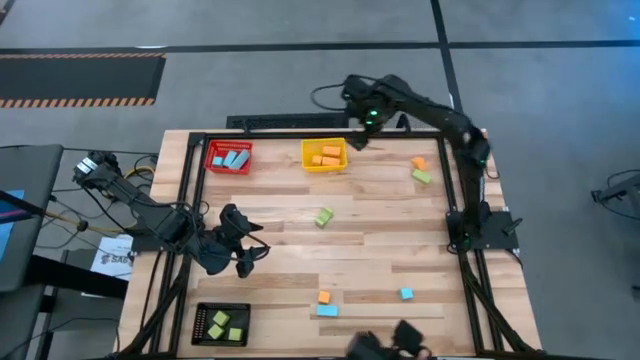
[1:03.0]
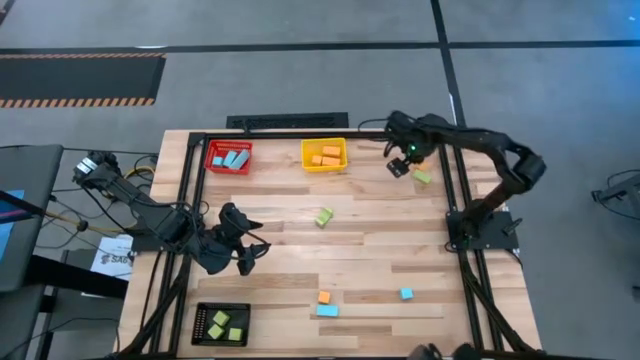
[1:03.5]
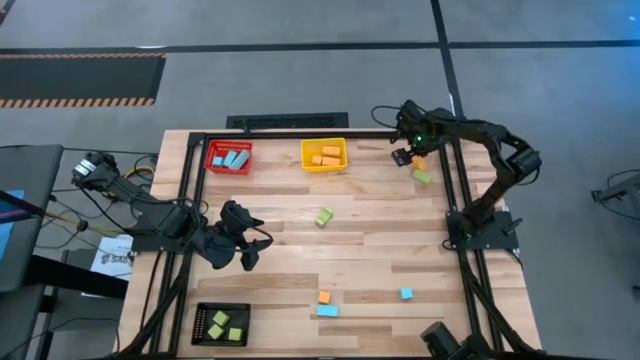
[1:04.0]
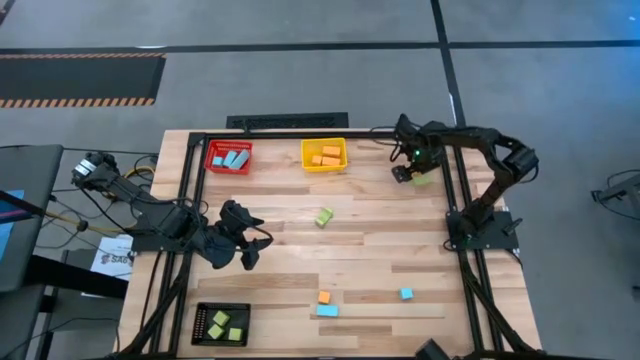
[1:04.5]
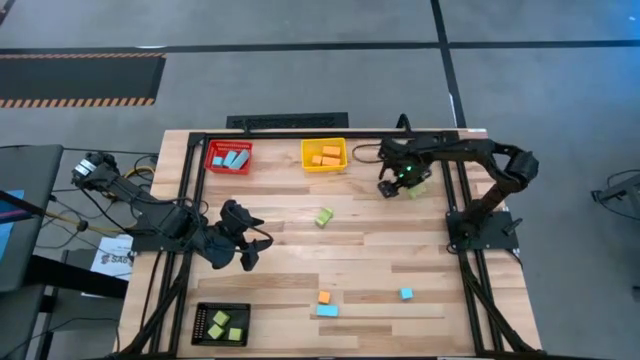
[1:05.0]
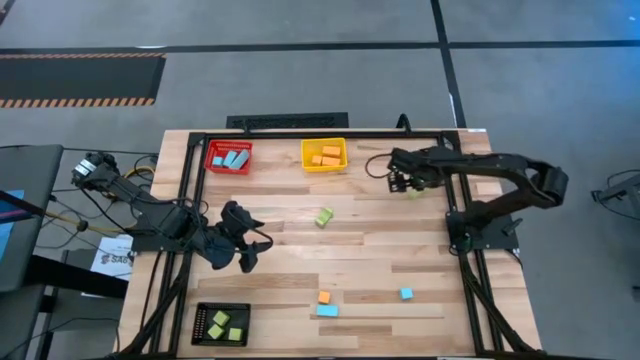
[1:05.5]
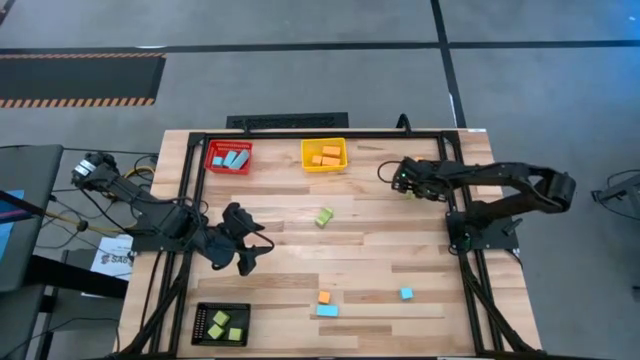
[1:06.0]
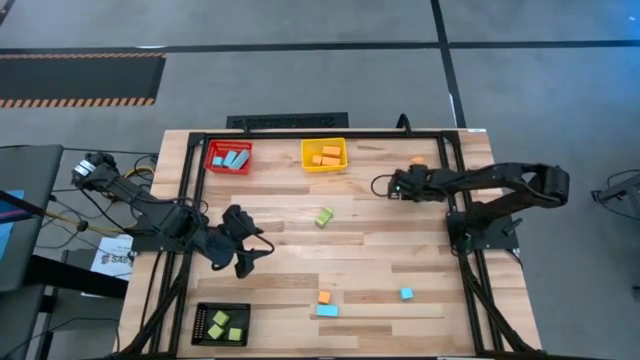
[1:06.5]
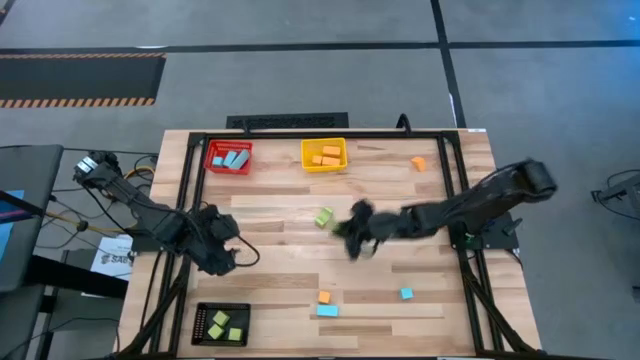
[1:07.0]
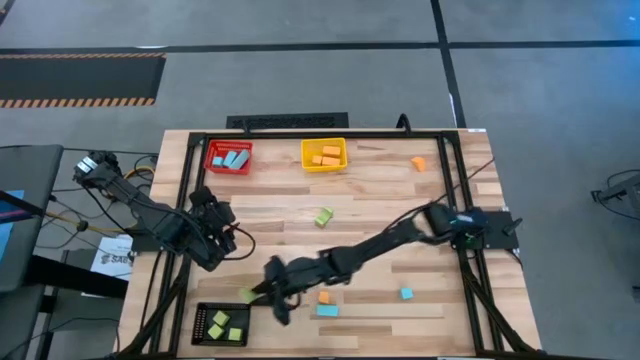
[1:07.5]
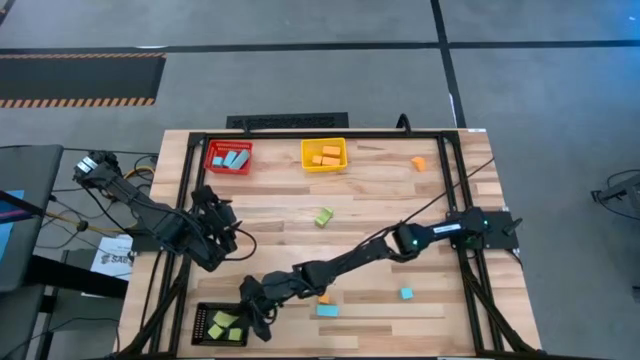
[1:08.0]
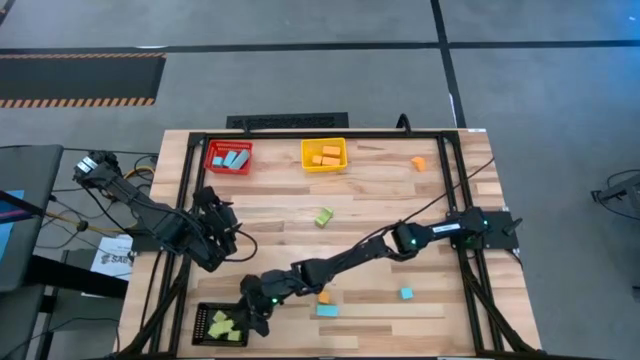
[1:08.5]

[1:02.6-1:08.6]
Task: Sort & place blocks by color
Put the wooden green block into the black bin

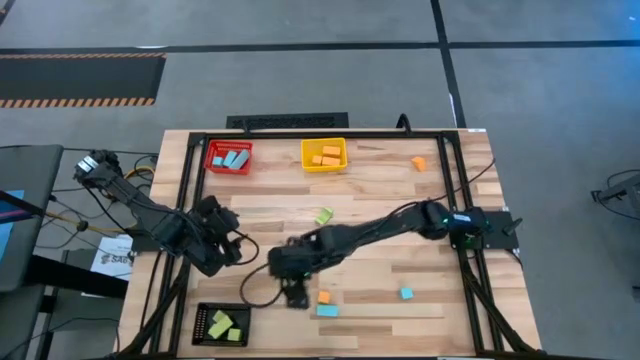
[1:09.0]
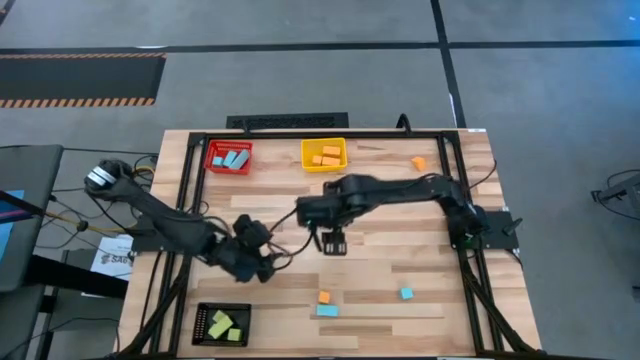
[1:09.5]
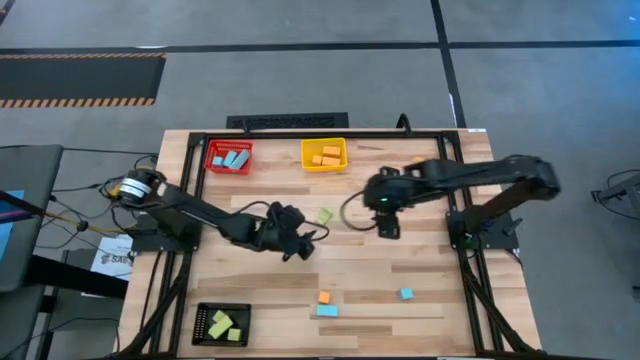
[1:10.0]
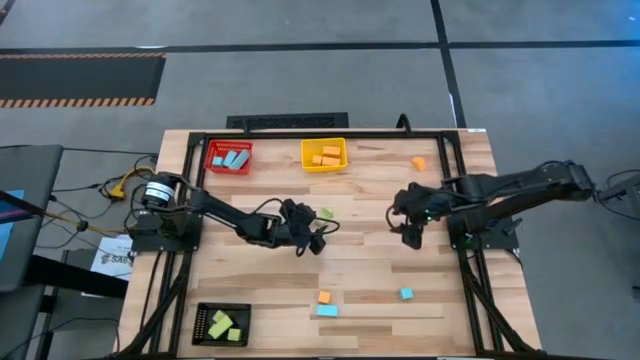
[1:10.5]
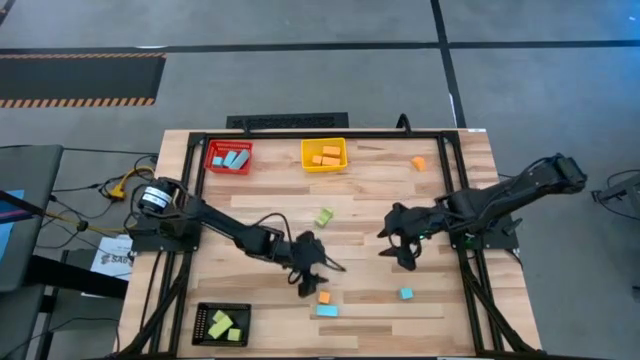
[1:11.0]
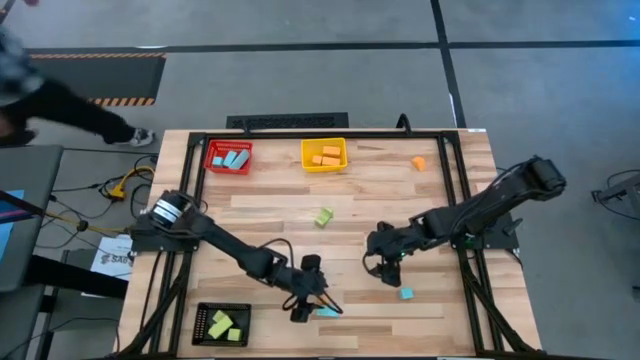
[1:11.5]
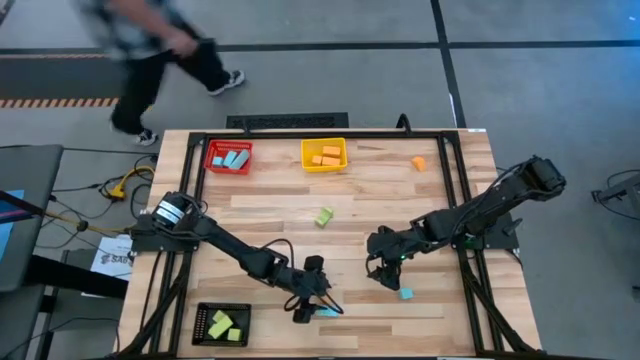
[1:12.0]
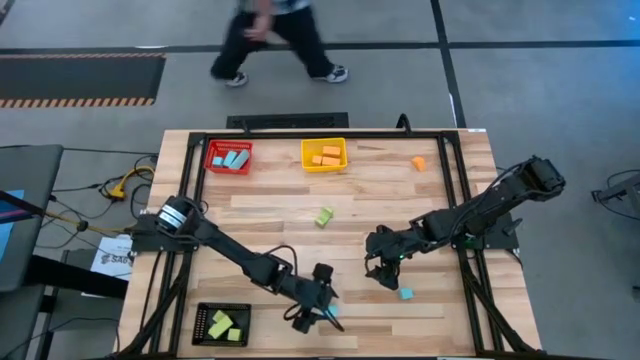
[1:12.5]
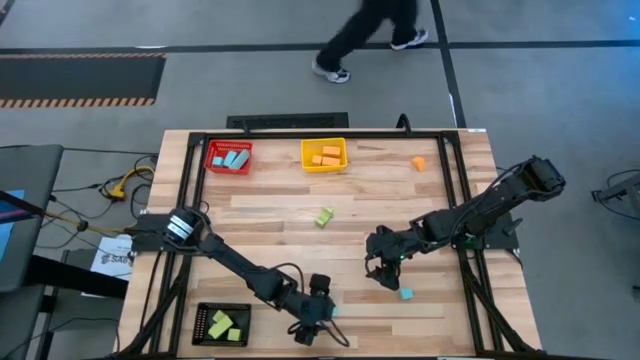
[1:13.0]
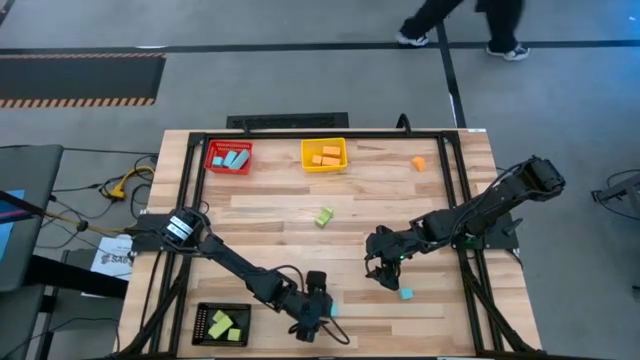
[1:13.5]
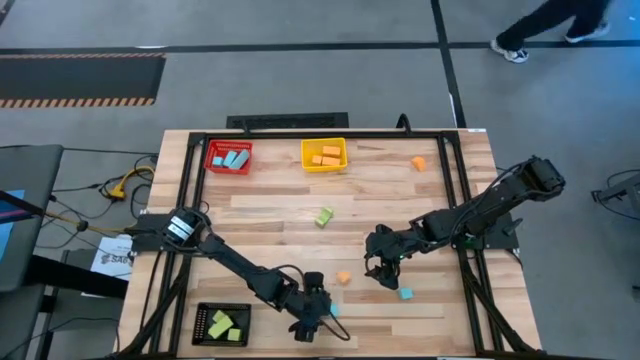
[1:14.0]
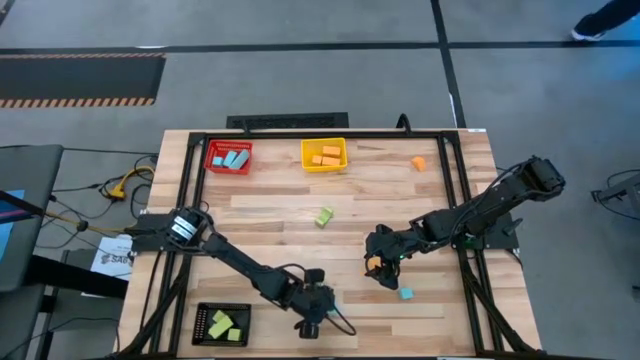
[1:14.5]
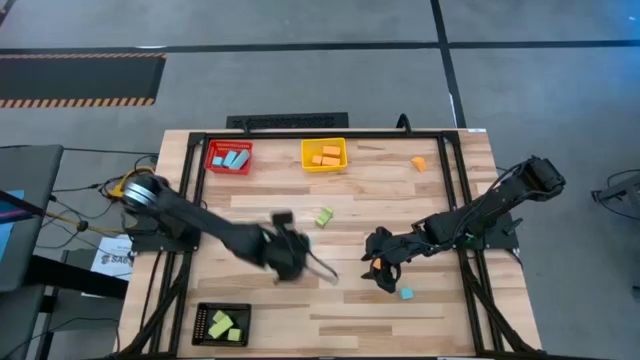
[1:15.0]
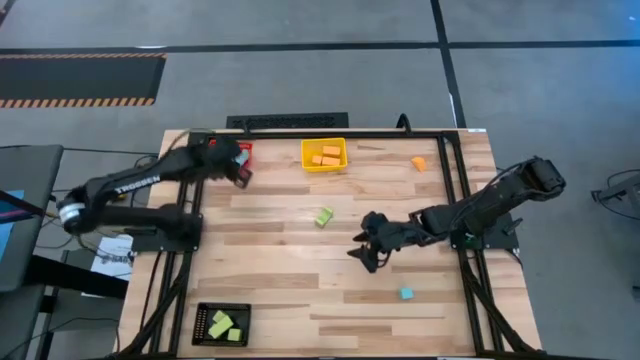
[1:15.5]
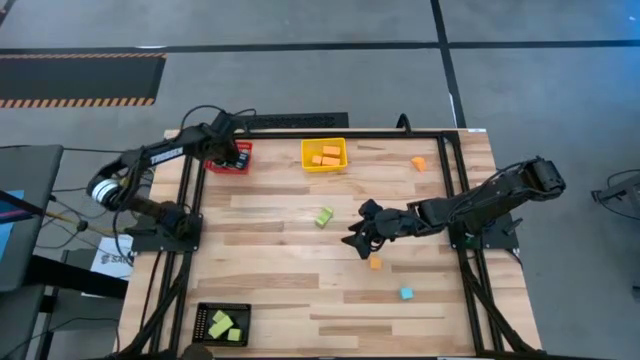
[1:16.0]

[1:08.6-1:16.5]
Put the wooden blue block into the red bin

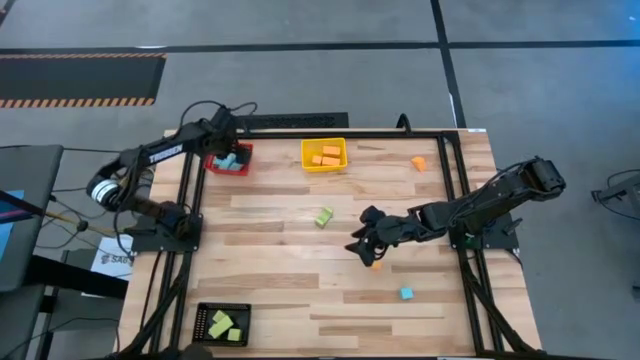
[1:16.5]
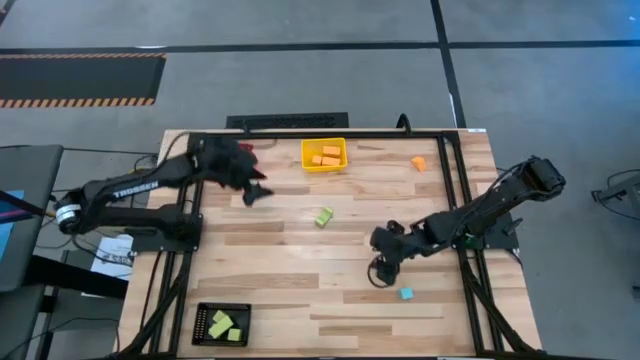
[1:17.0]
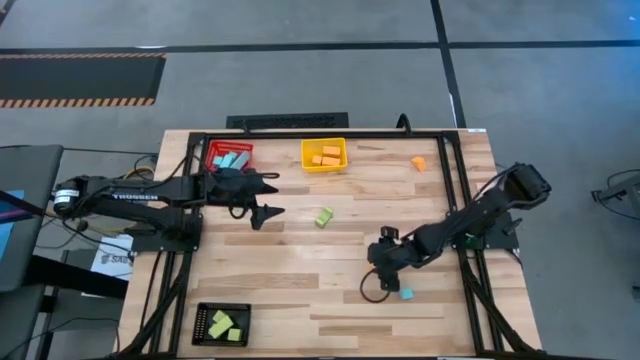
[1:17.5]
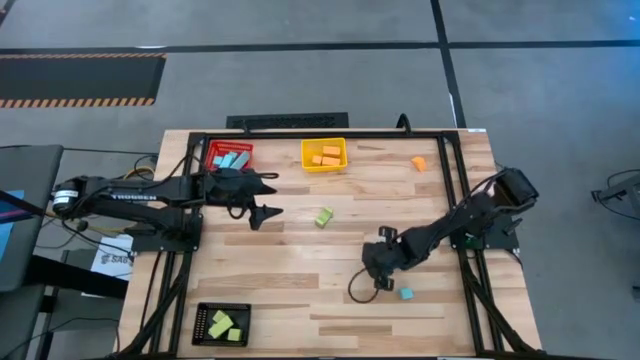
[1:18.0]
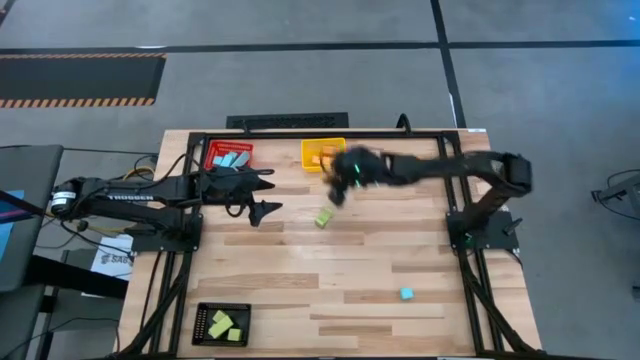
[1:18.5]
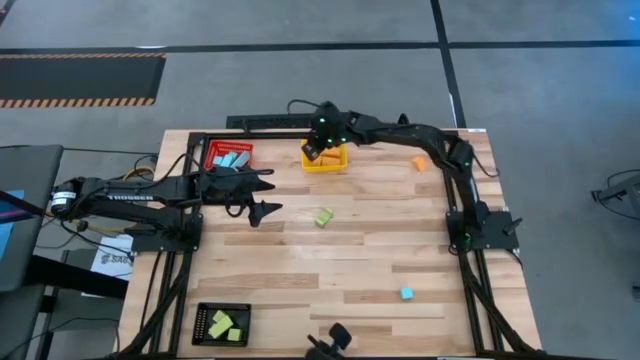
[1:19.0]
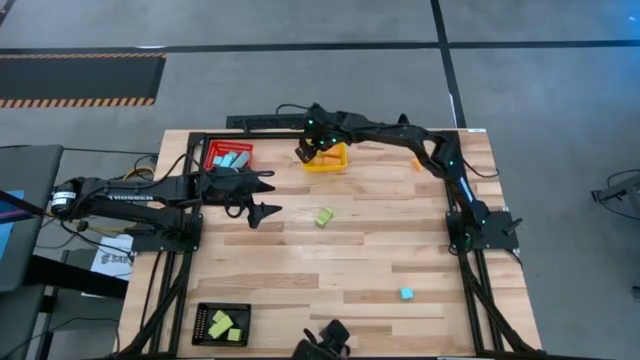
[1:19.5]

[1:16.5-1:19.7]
Put the wooden yellow block into the yellow bin

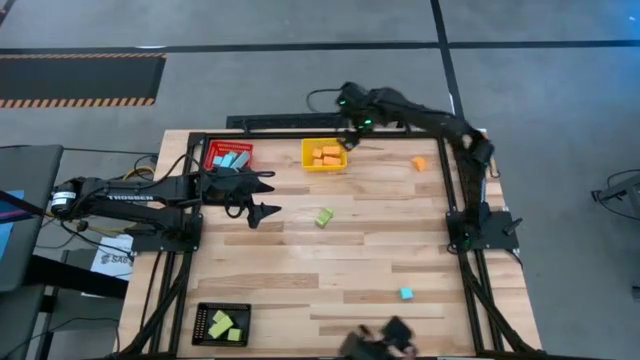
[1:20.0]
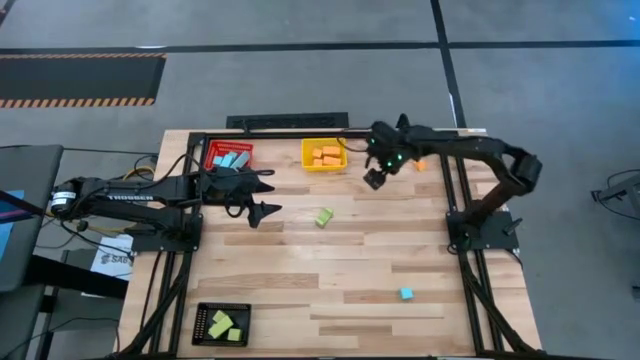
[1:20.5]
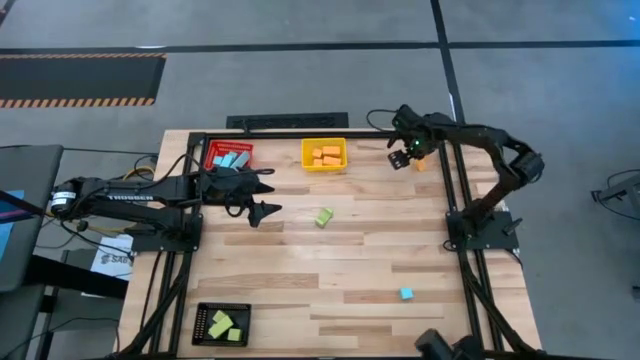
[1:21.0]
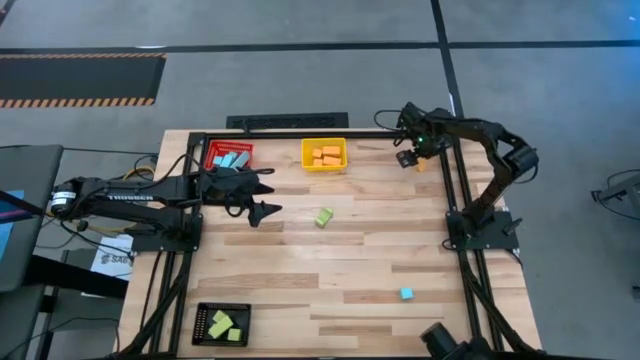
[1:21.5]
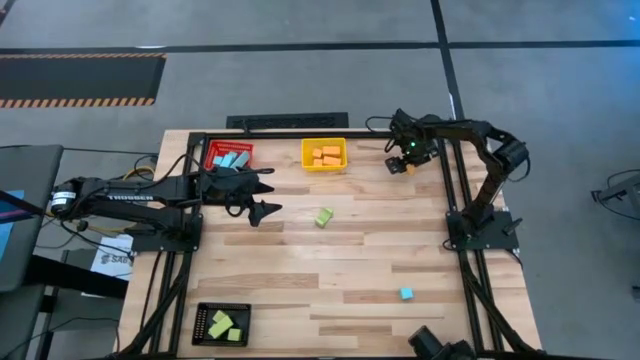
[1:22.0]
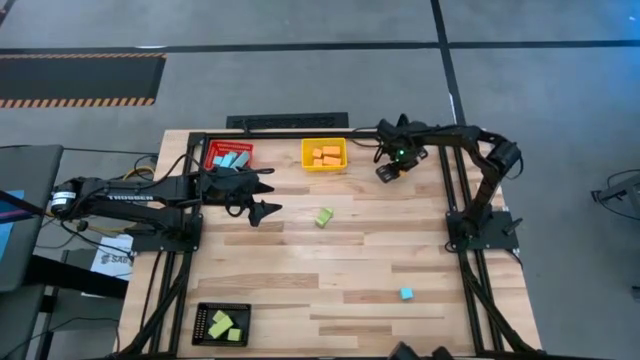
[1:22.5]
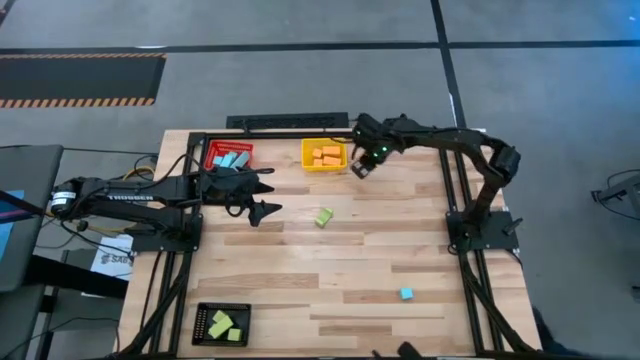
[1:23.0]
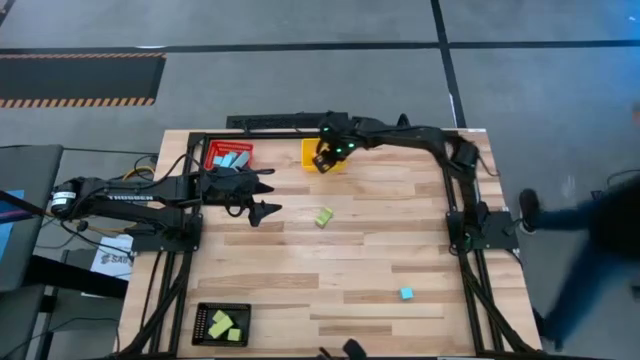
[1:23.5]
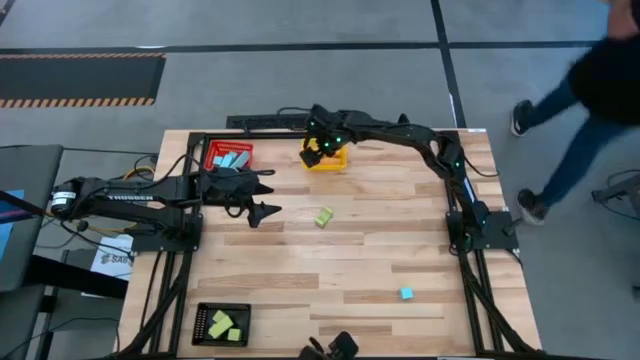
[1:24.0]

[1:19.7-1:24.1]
Put the wooden yellow block into the yellow bin
